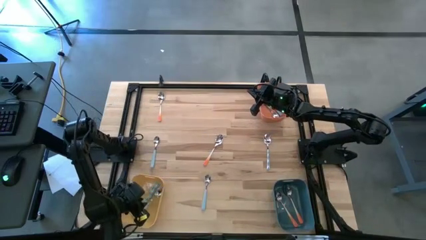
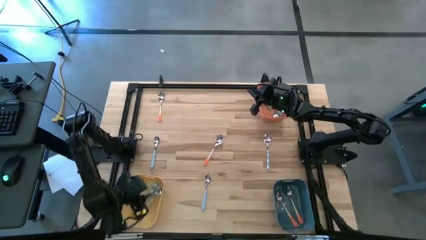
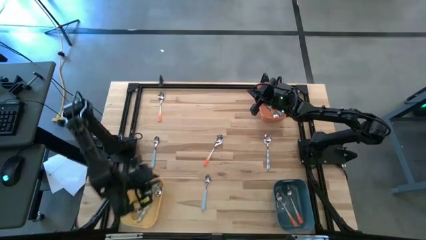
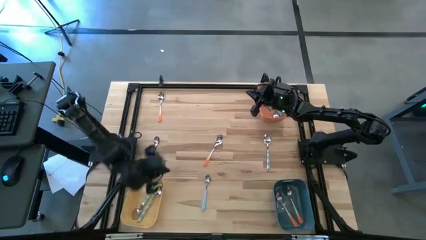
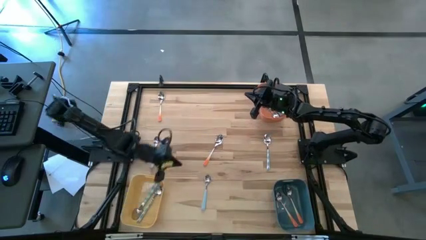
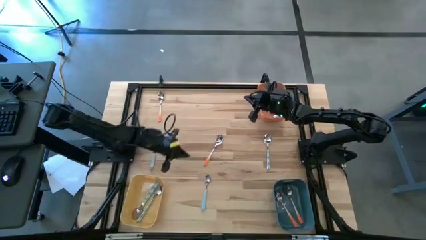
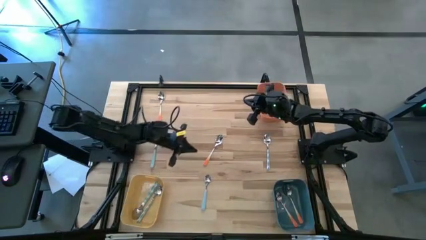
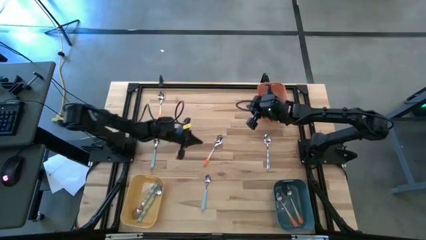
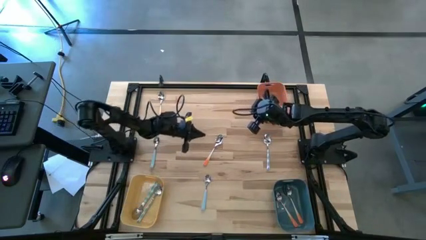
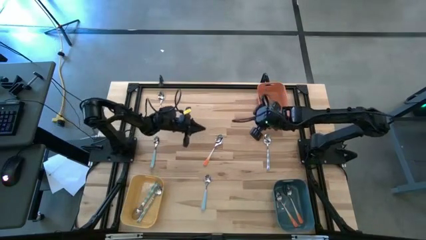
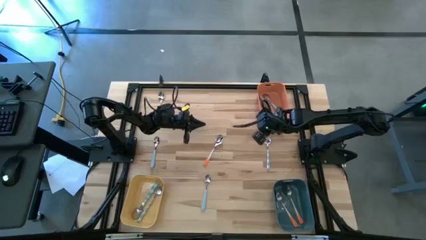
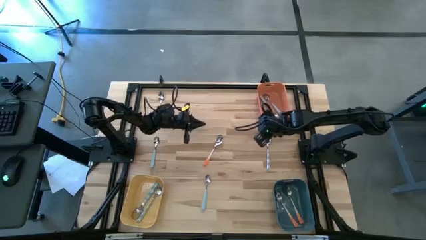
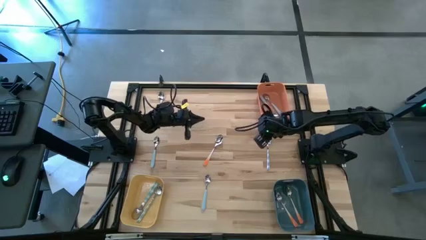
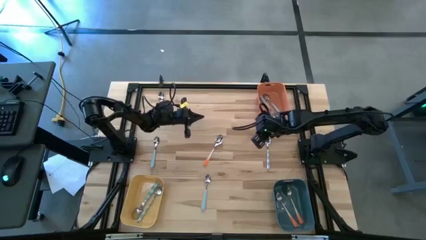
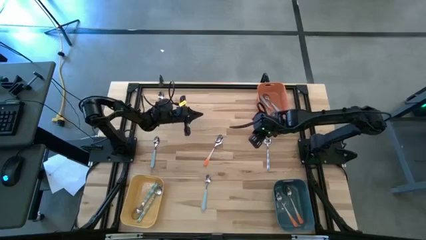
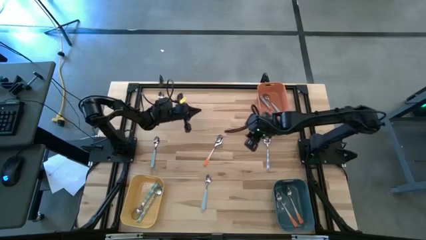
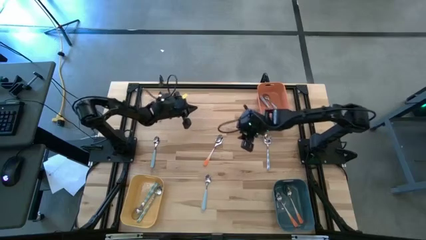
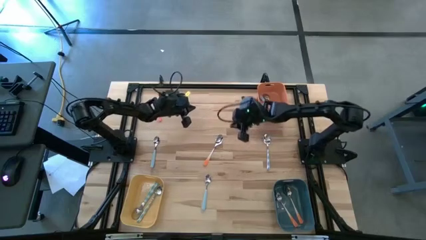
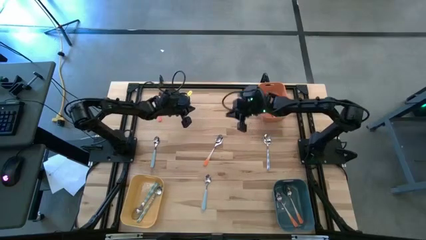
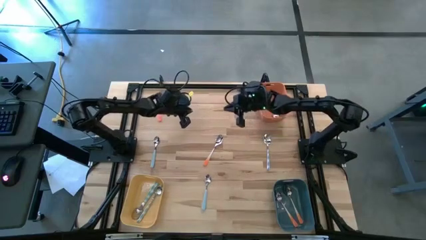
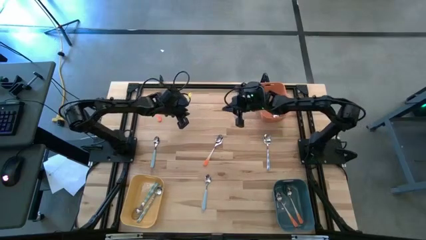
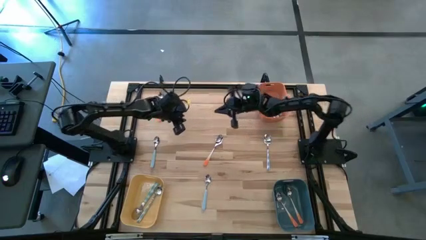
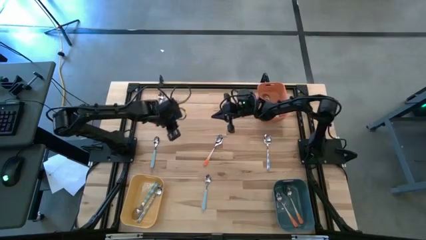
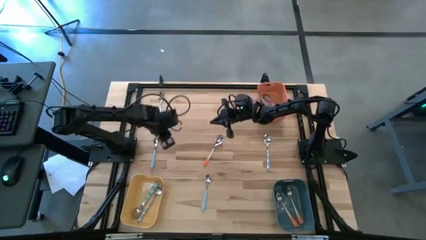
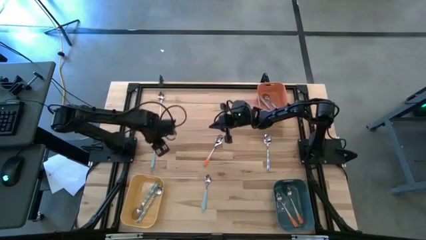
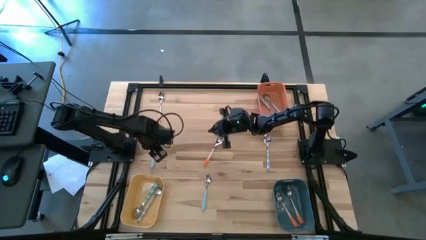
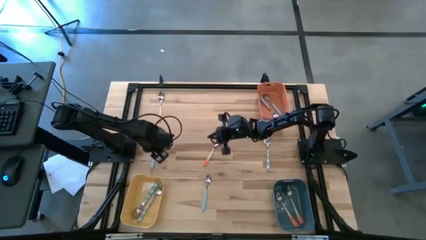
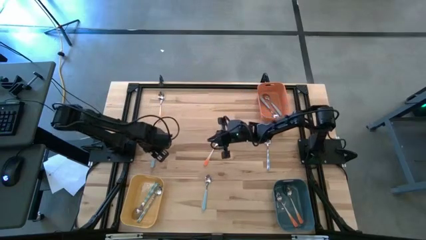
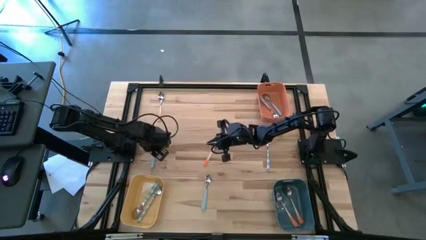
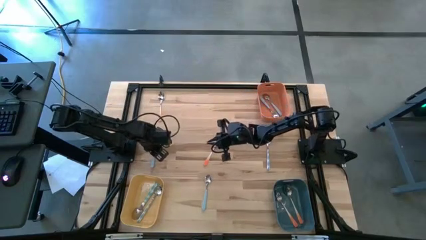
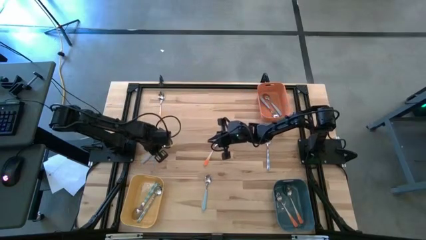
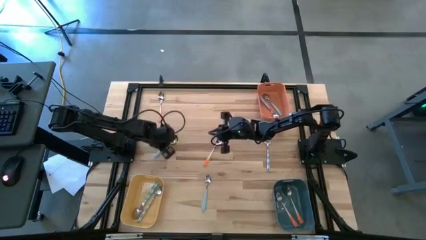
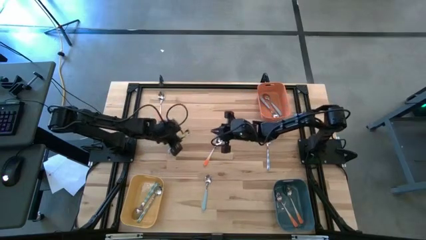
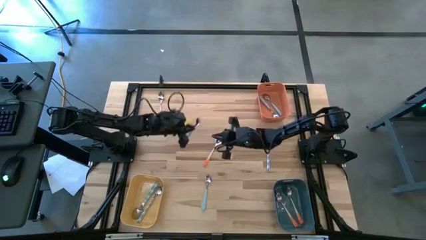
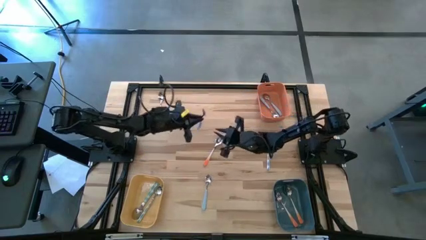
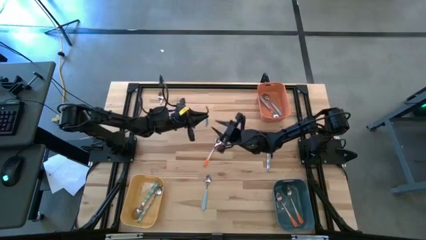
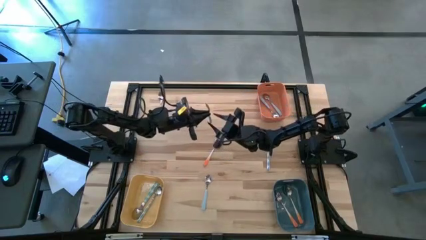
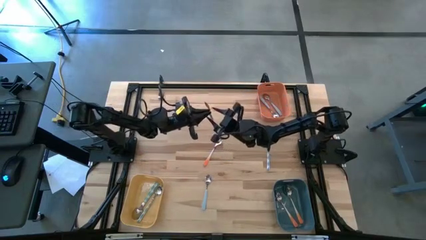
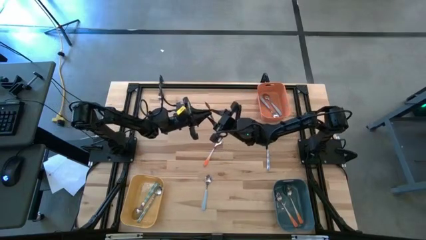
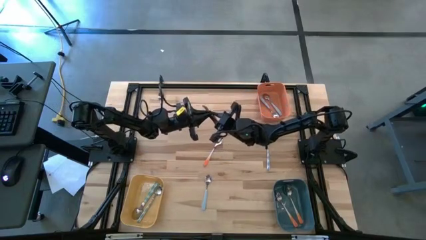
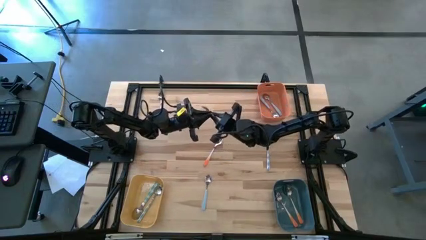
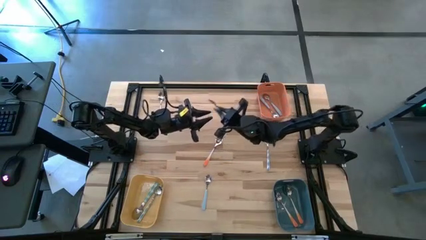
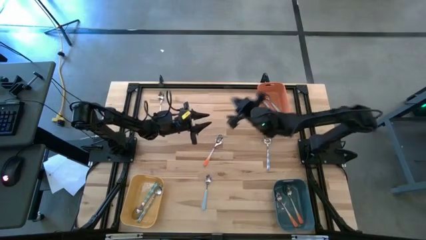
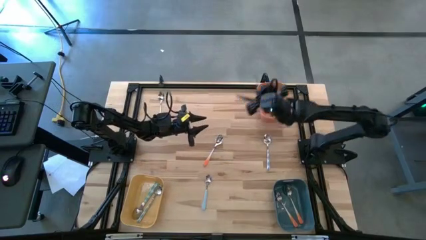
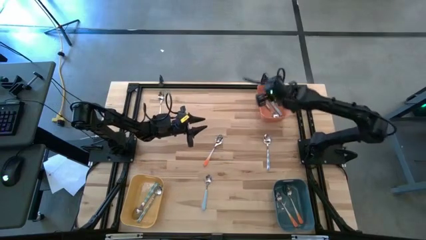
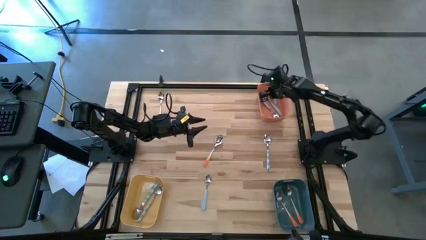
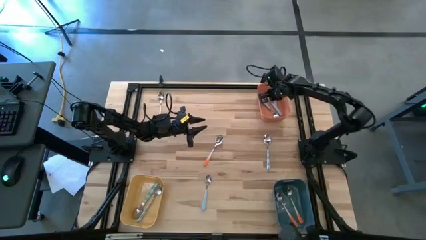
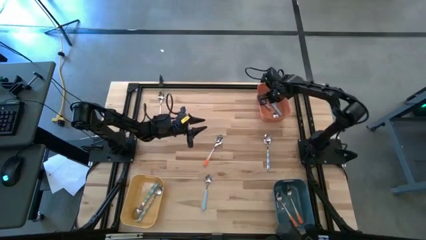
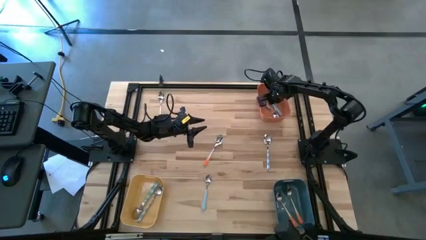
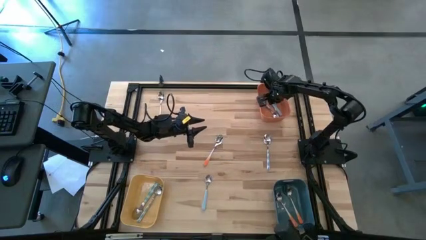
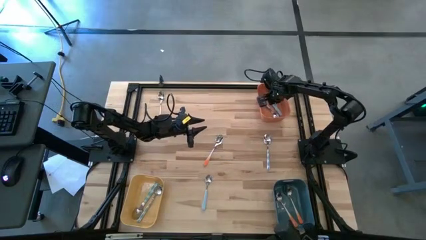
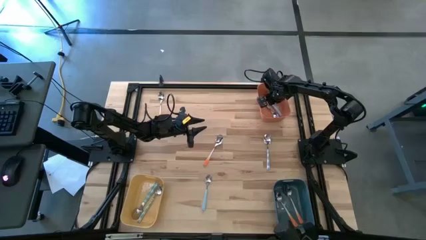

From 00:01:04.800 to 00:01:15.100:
Task: Sort silverware by color (type)
Put the top left blue spoon into the orange bin

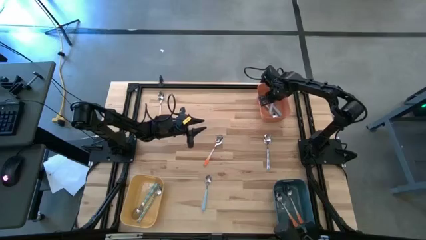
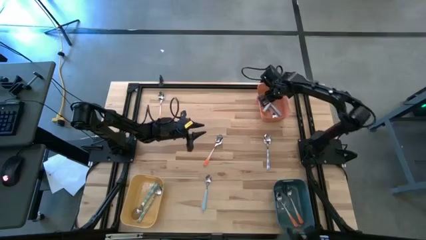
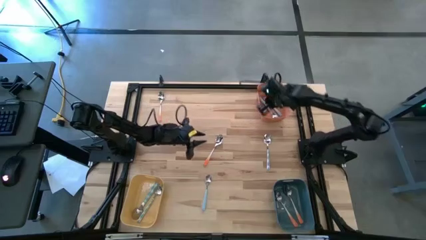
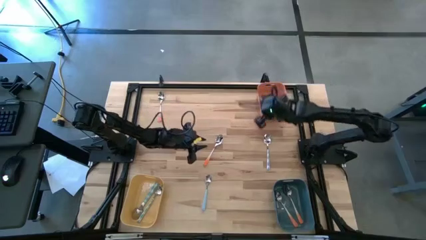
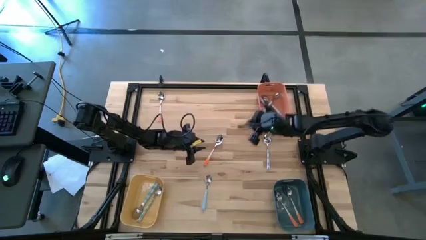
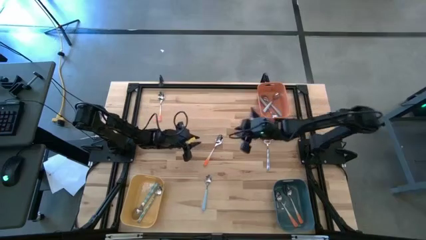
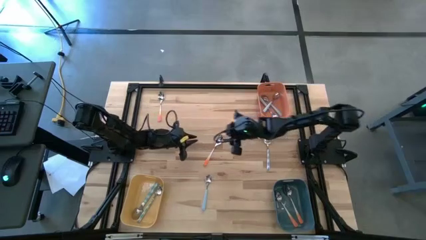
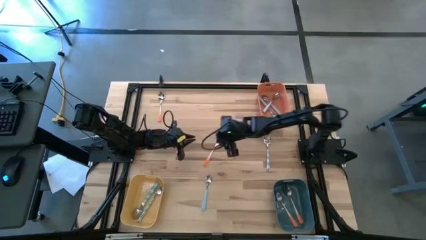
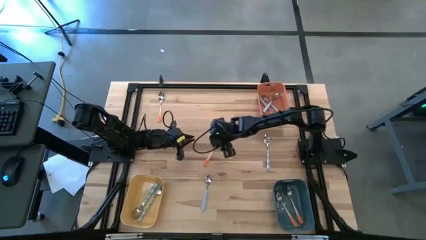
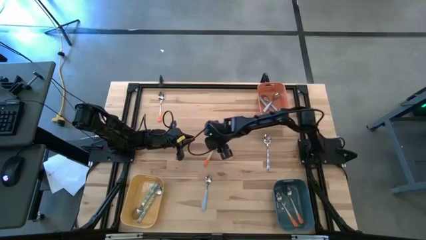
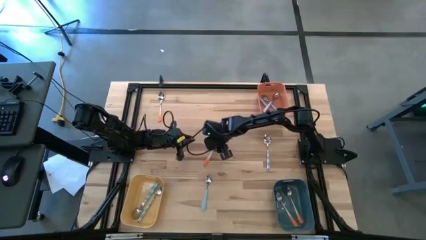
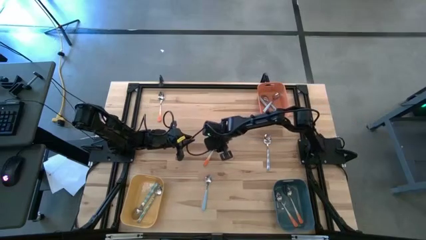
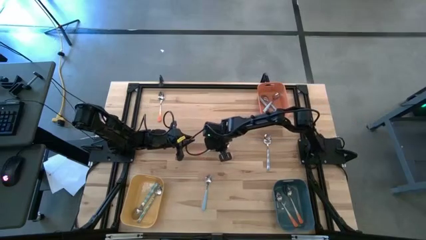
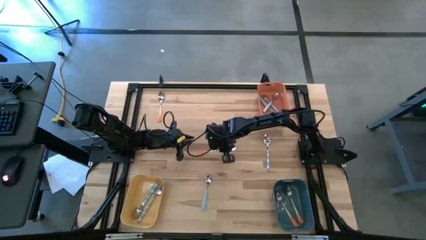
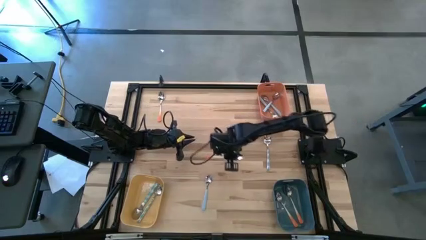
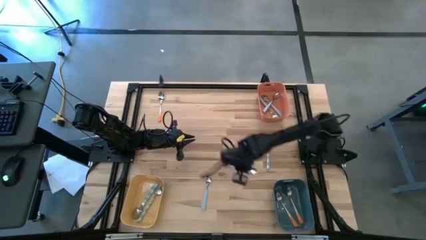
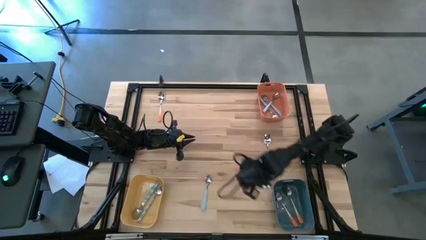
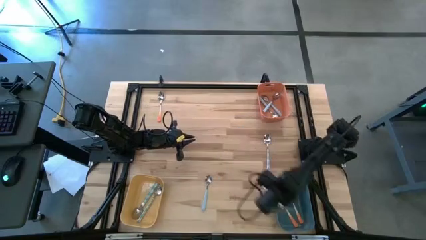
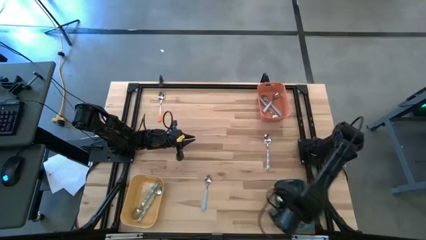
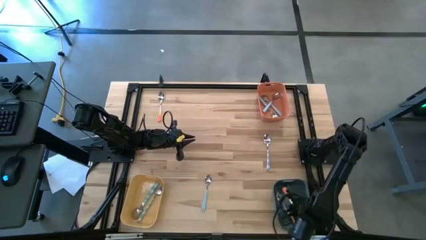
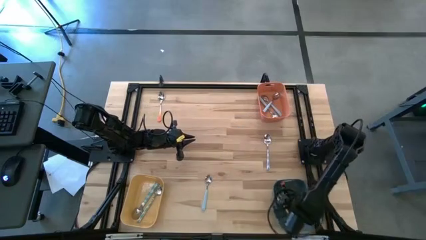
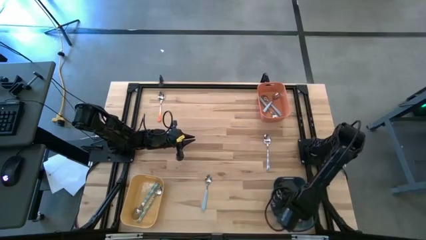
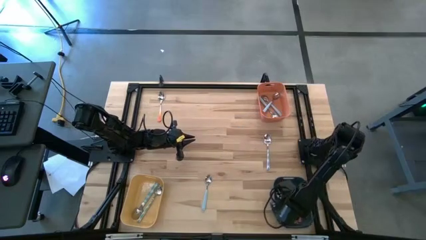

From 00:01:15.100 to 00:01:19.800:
Put the bottom right orange spoon into the dark blue bin
